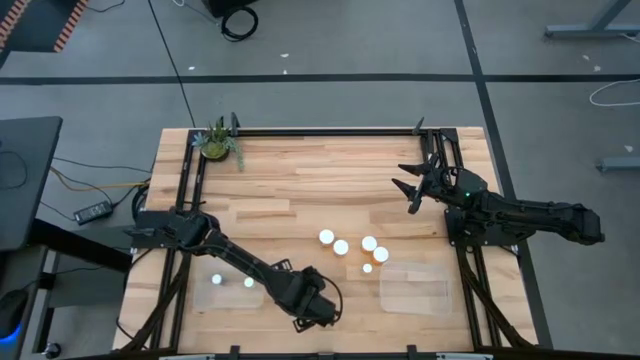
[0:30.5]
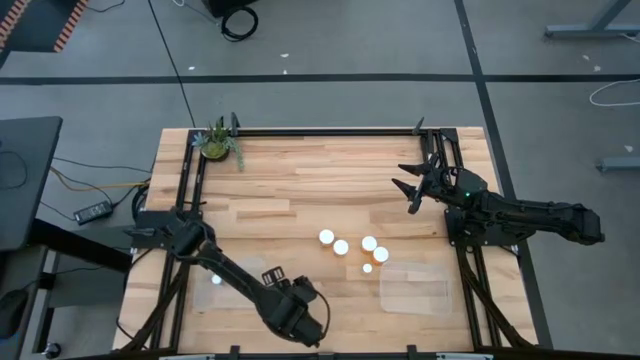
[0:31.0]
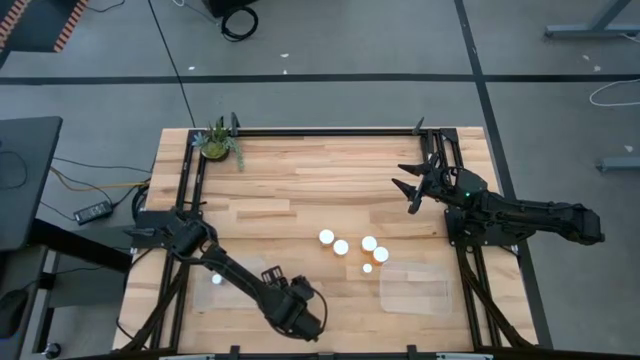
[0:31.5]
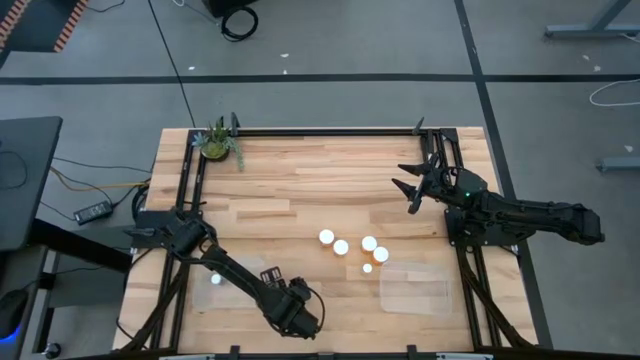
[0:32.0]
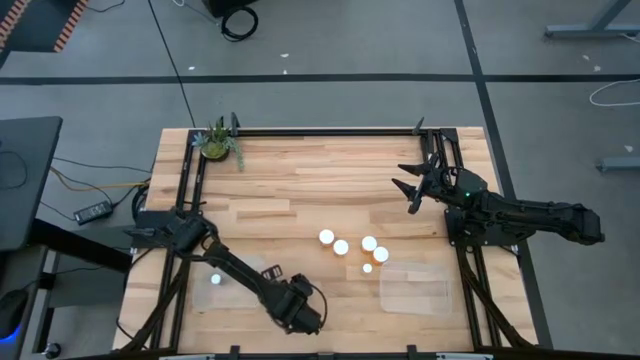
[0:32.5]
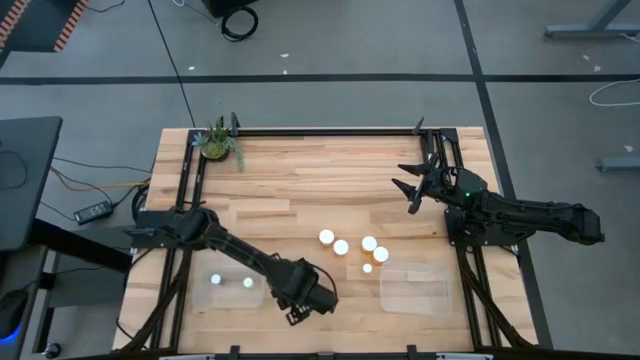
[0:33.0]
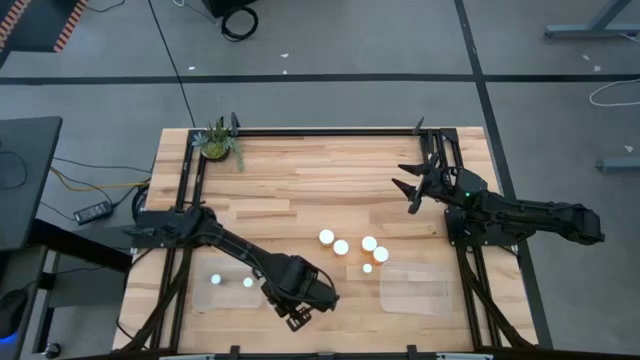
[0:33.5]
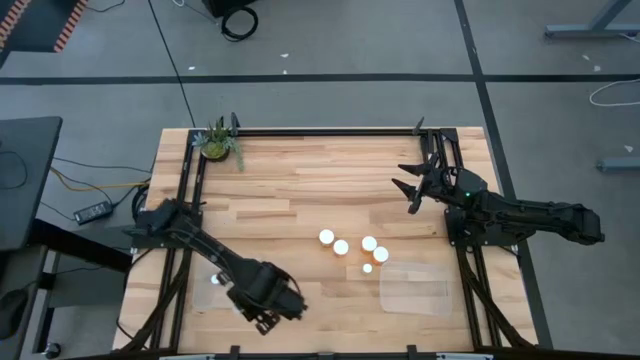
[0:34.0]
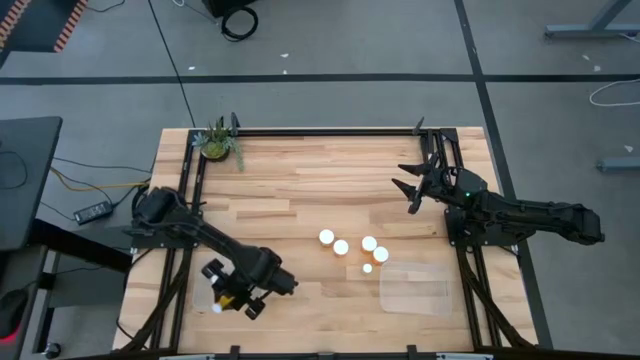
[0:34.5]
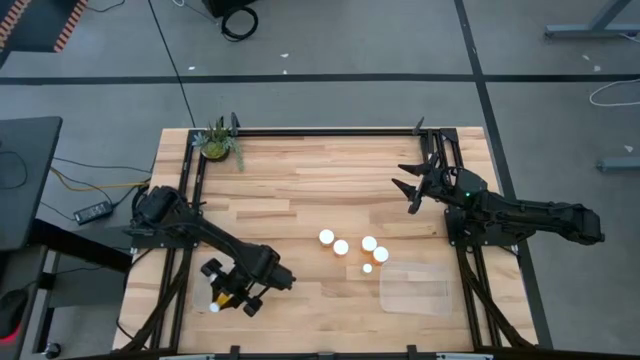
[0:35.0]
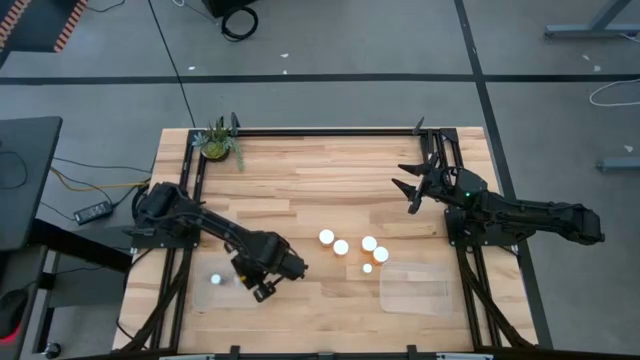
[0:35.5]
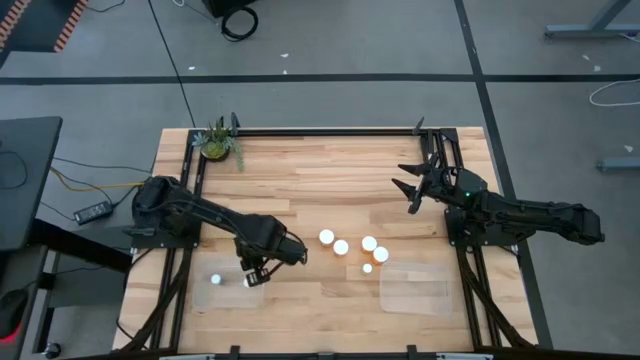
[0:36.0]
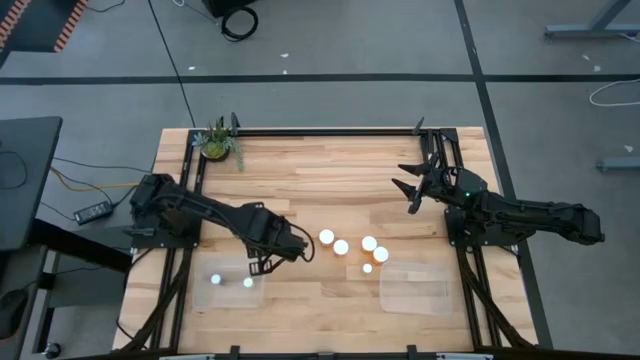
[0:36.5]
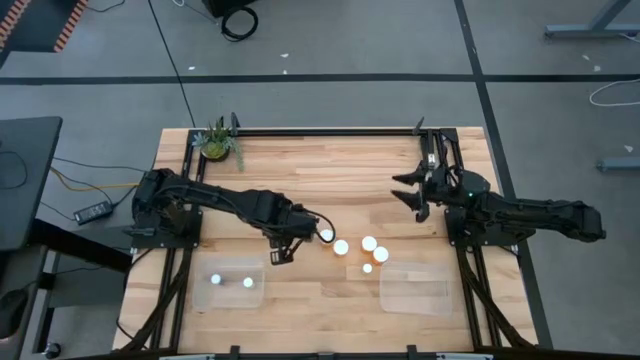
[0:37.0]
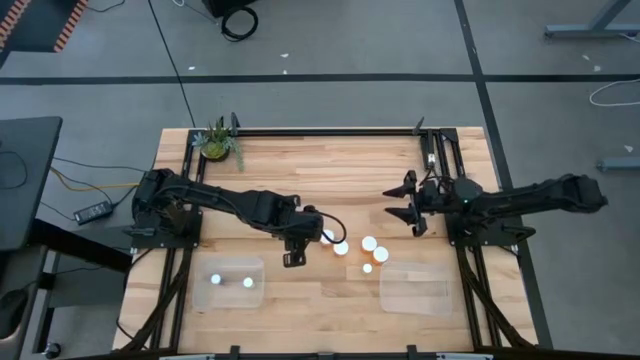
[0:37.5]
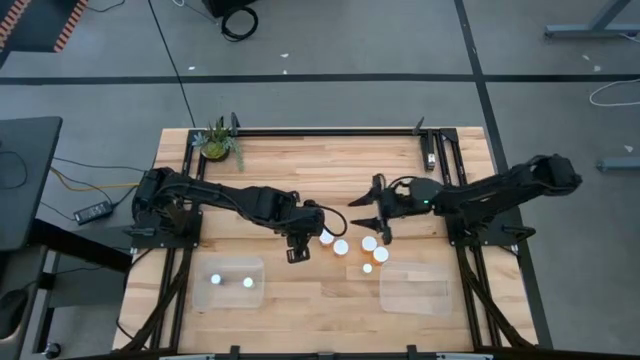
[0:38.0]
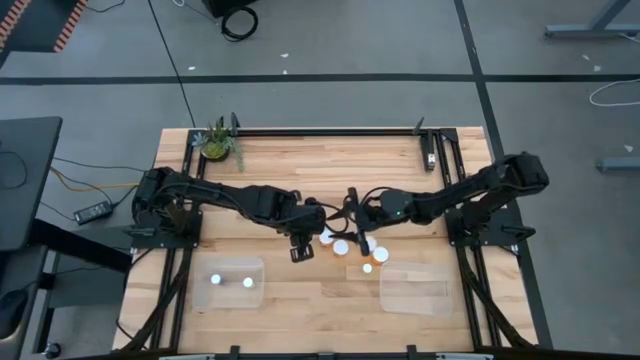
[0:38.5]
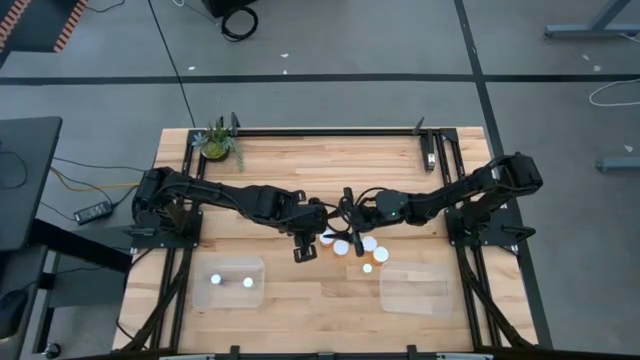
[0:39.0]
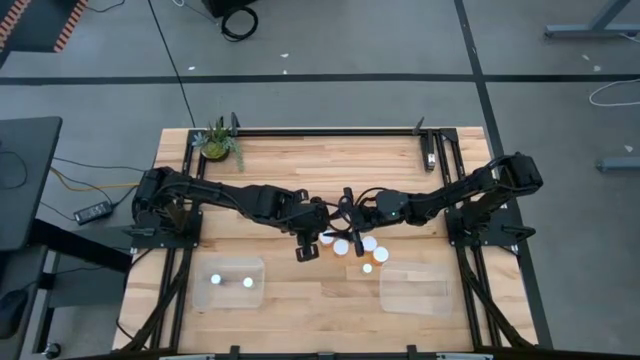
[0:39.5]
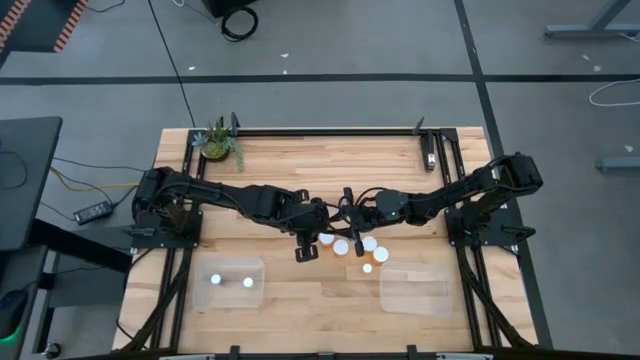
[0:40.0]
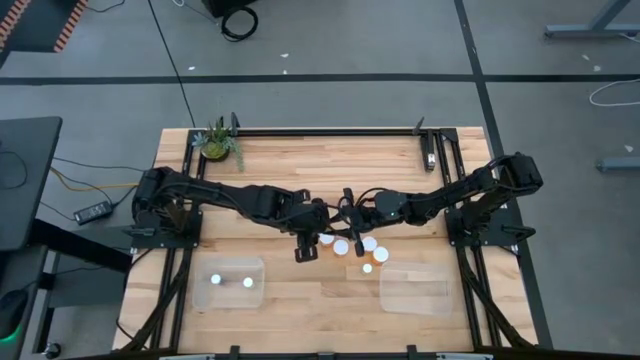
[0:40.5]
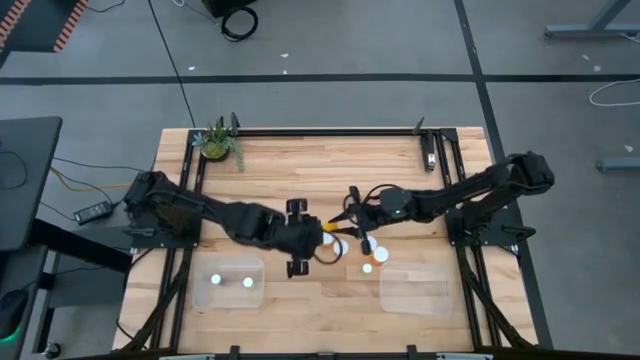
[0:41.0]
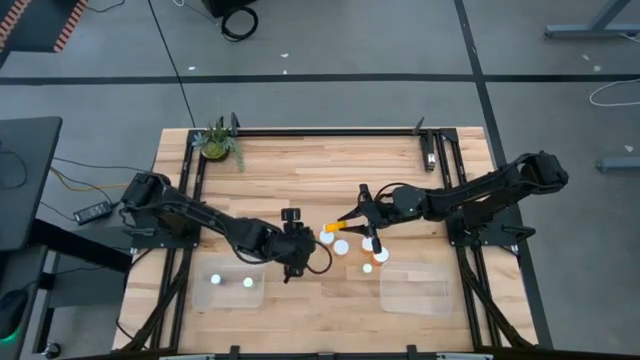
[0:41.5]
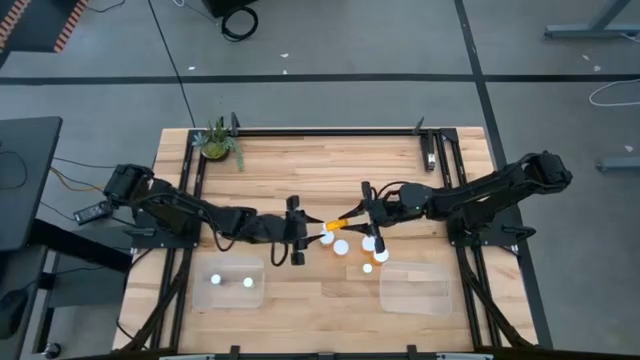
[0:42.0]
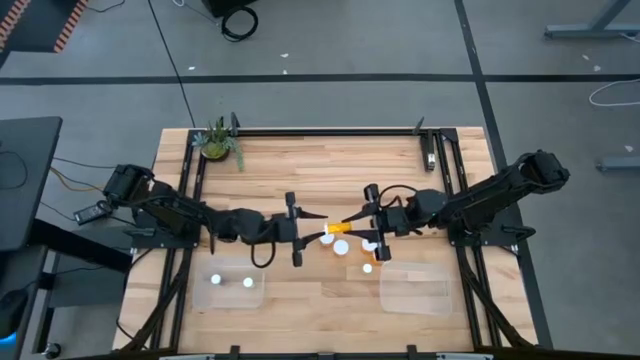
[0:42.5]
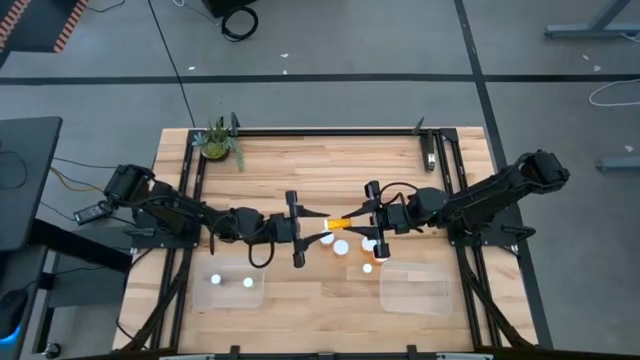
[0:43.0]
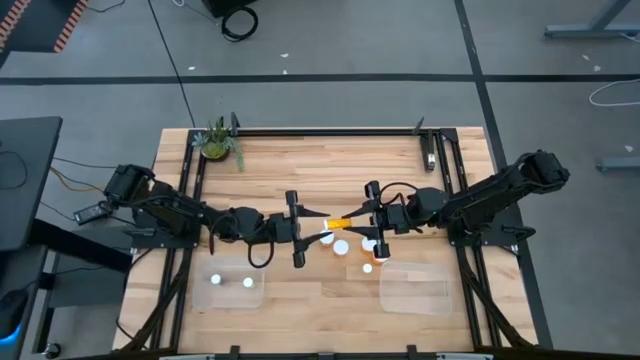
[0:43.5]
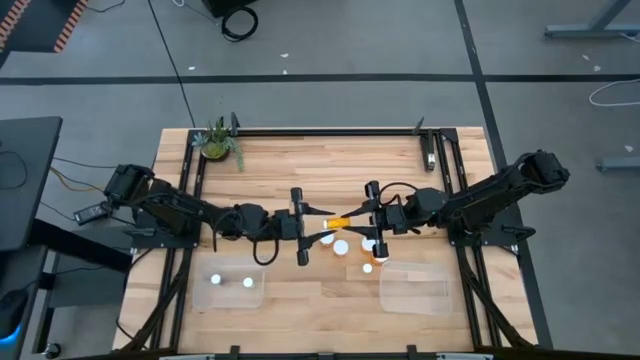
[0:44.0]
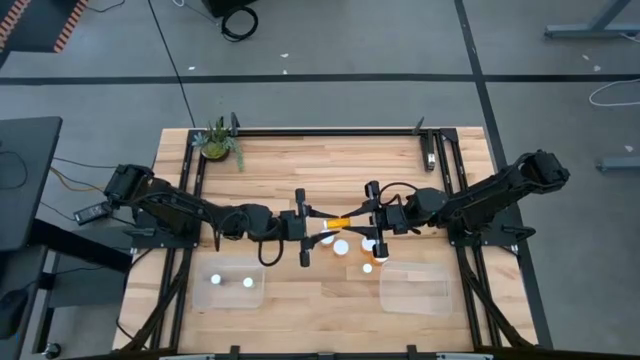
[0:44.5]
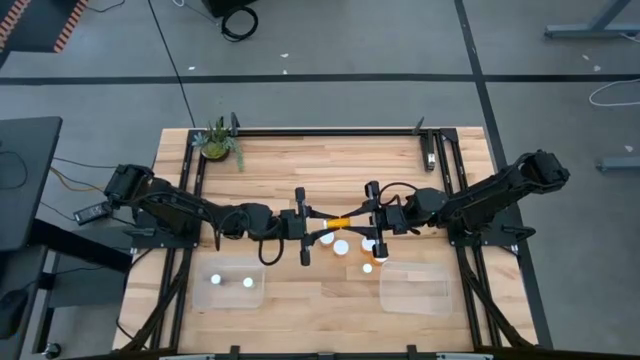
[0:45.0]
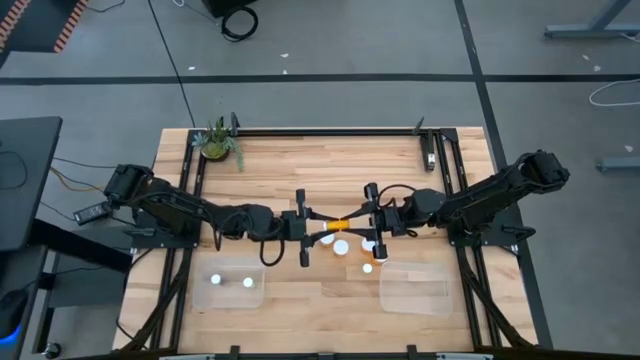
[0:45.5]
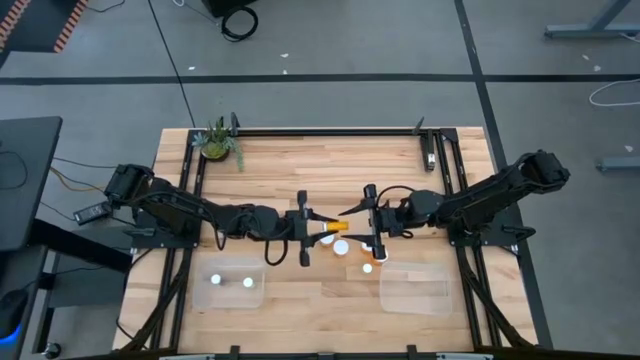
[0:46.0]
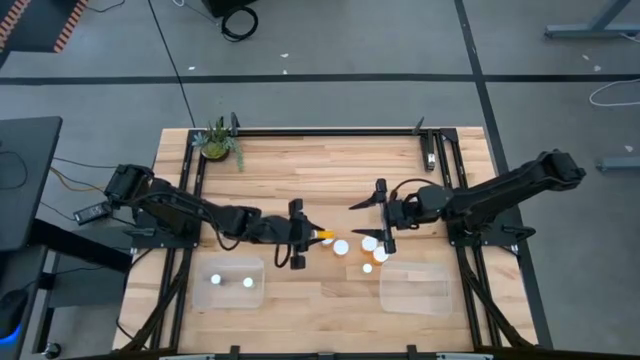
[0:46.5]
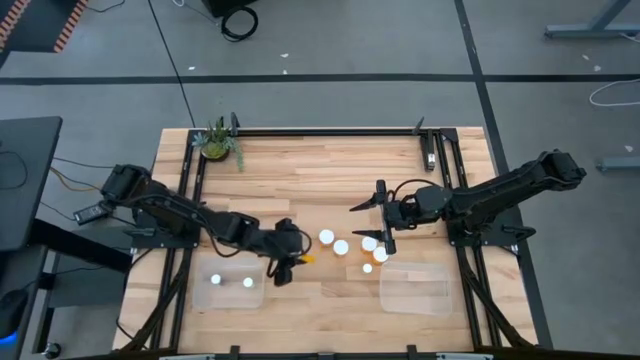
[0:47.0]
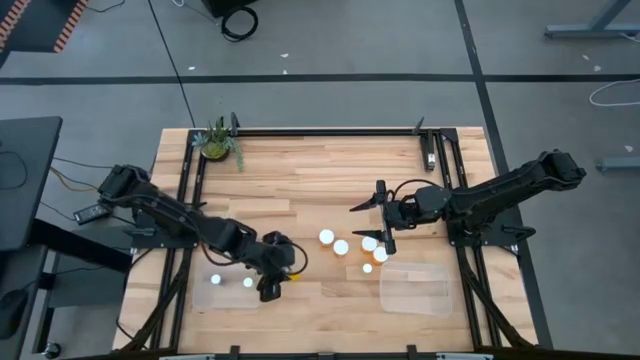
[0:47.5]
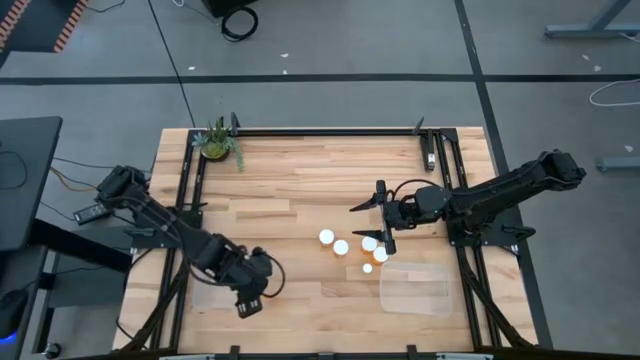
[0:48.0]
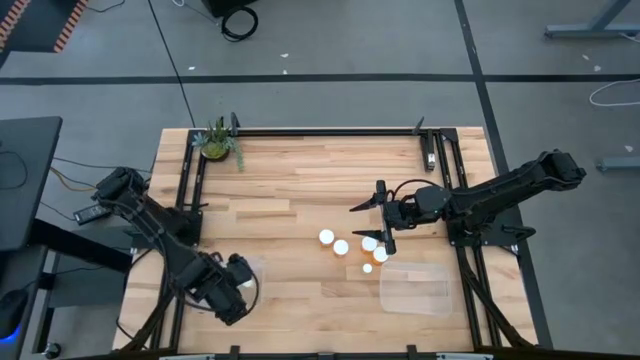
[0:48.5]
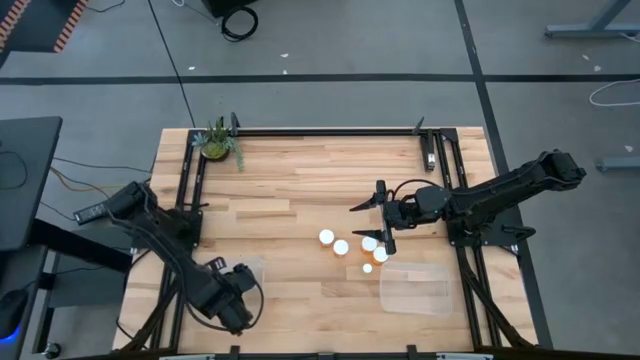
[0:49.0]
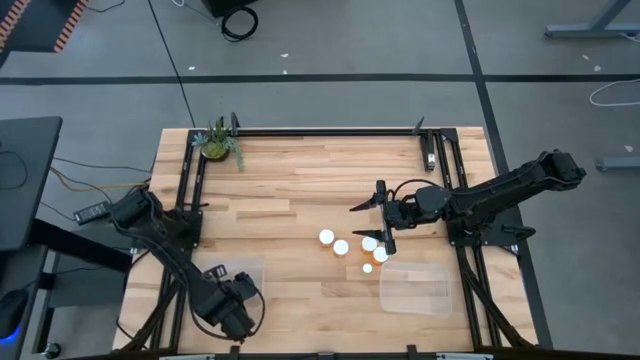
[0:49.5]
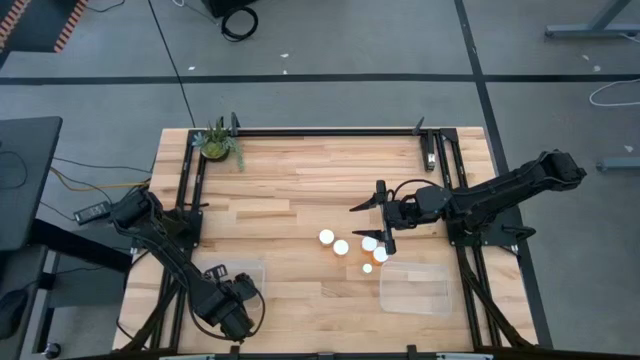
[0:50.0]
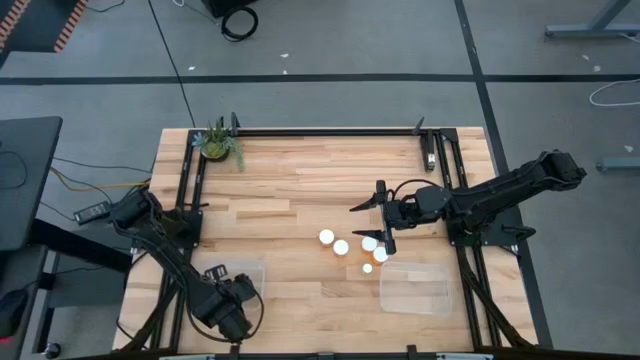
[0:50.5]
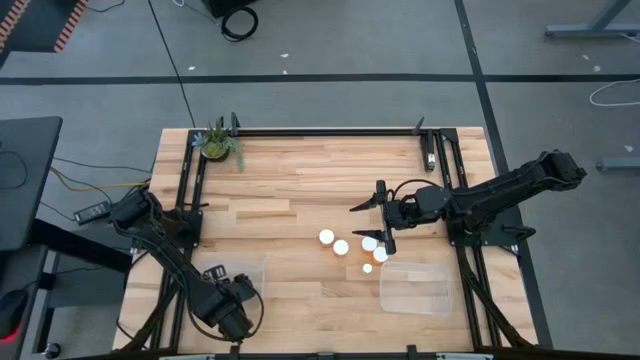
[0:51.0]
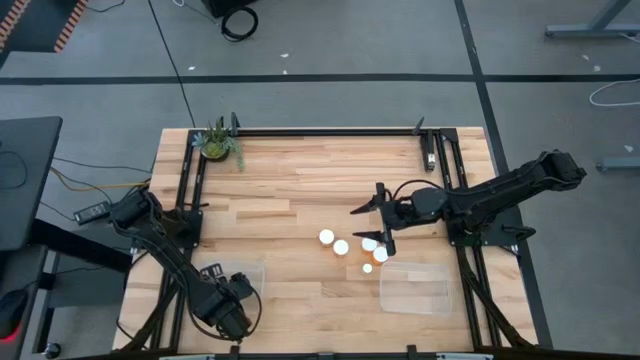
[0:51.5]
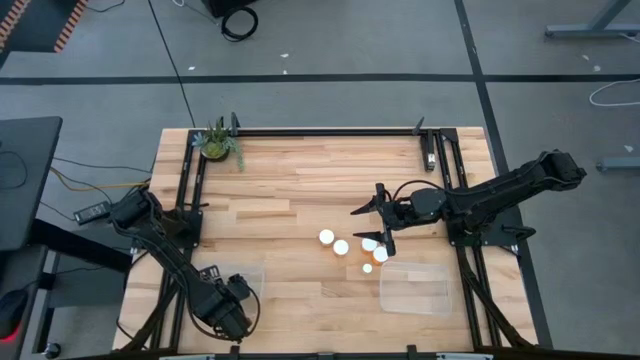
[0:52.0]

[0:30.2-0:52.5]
Task: Pick and place medicine bottles into bin by pill shape (circle, oval)
Put the small orange pill bottle into the left transparent bin
